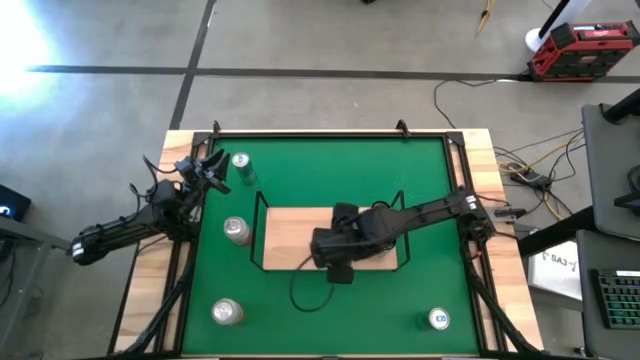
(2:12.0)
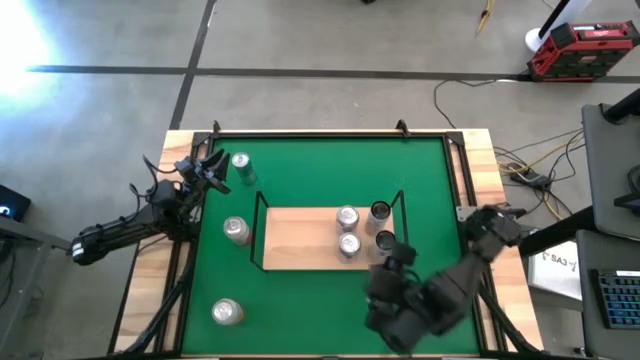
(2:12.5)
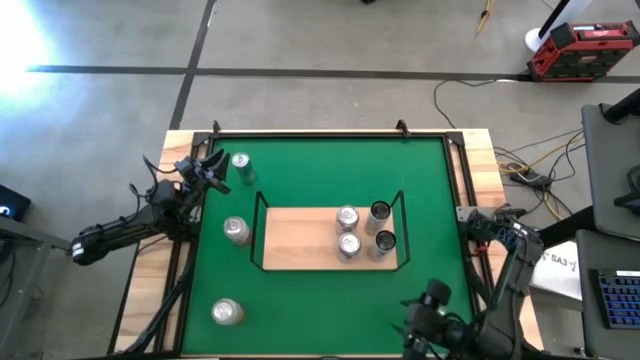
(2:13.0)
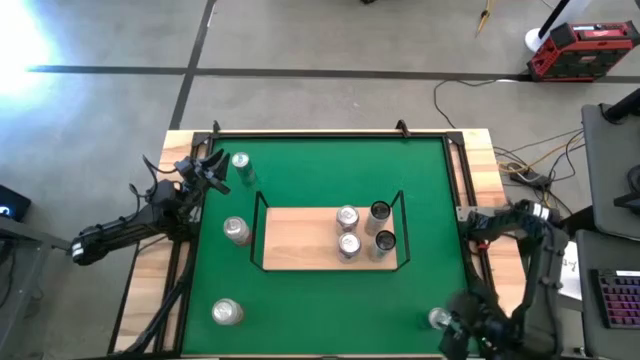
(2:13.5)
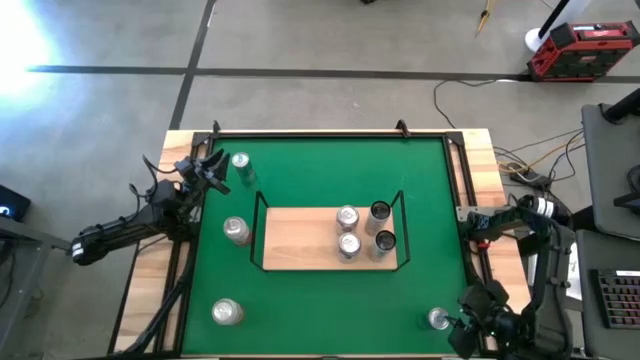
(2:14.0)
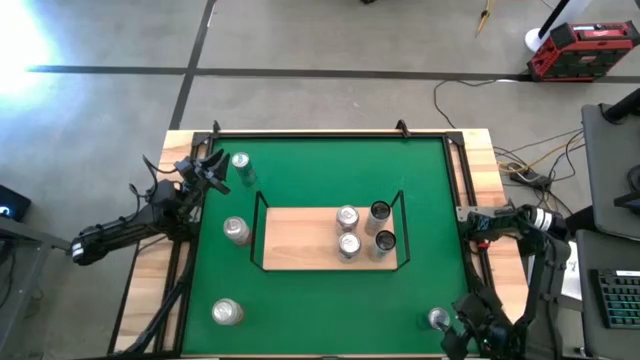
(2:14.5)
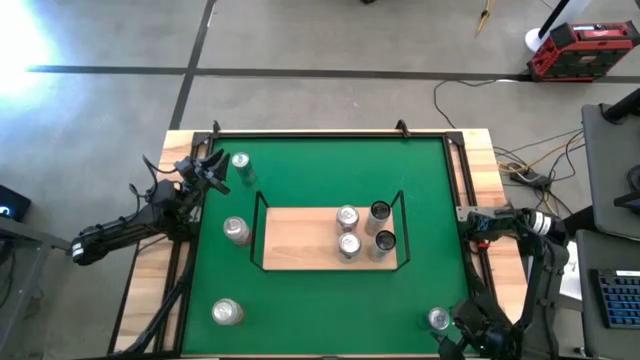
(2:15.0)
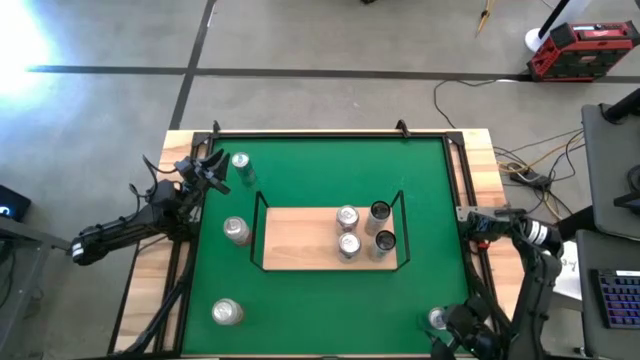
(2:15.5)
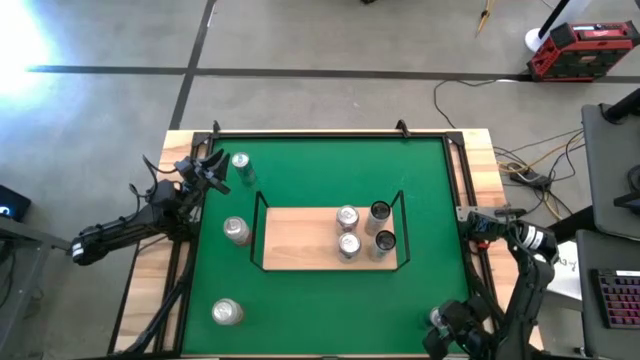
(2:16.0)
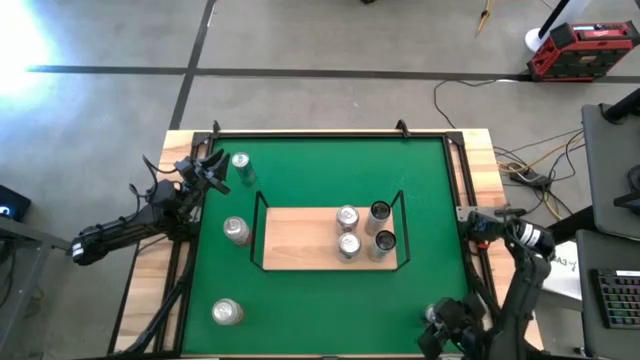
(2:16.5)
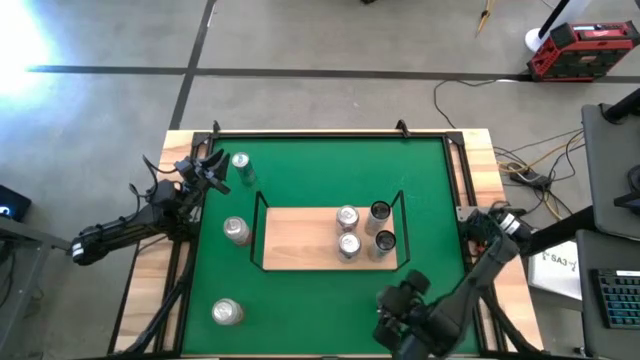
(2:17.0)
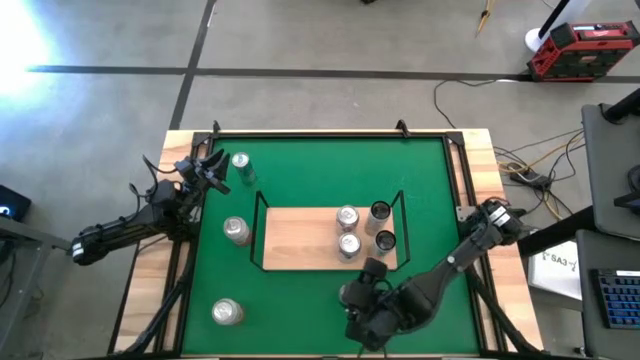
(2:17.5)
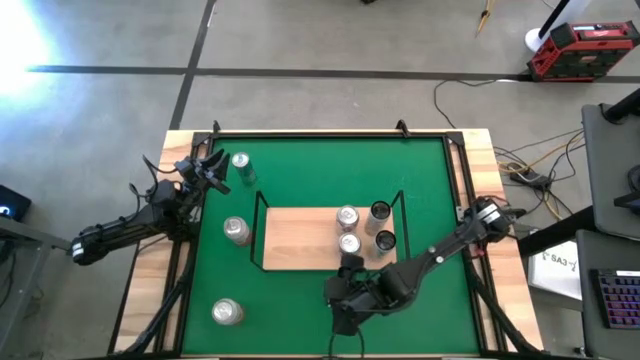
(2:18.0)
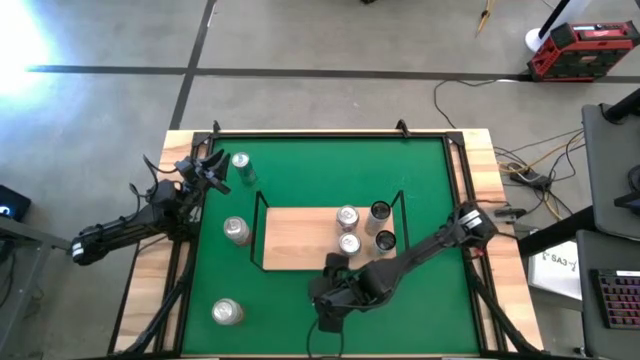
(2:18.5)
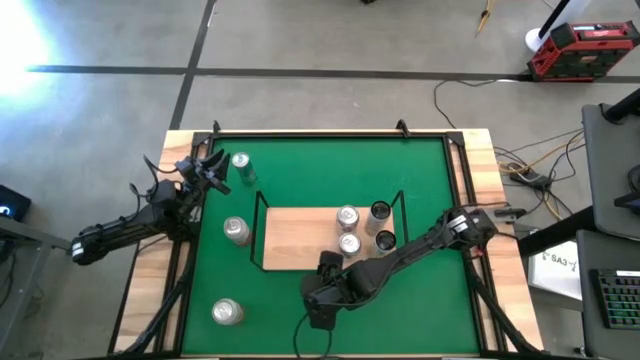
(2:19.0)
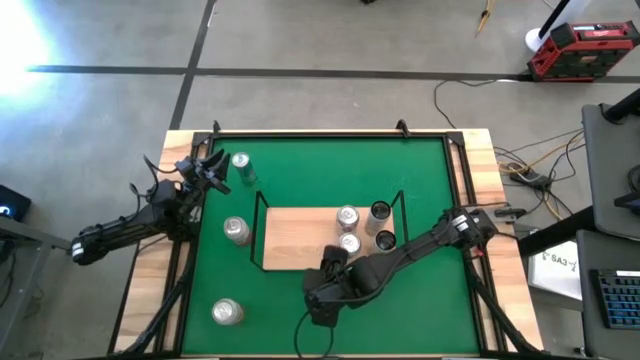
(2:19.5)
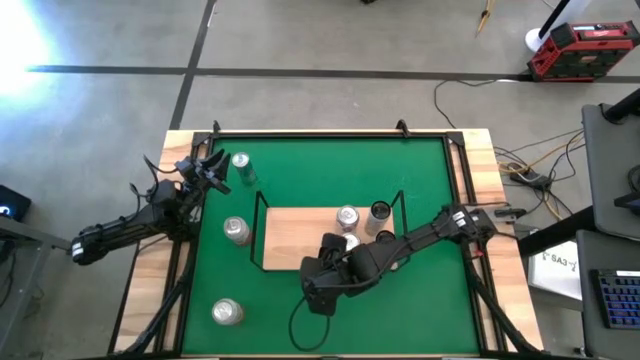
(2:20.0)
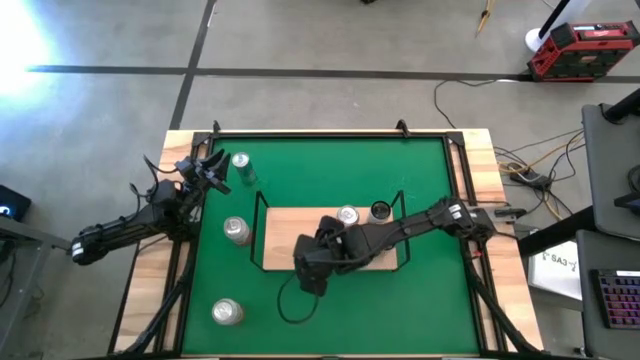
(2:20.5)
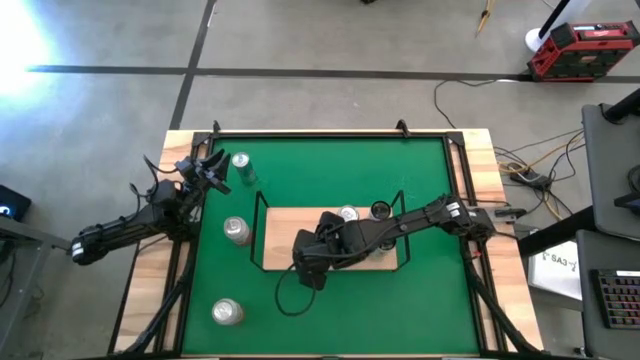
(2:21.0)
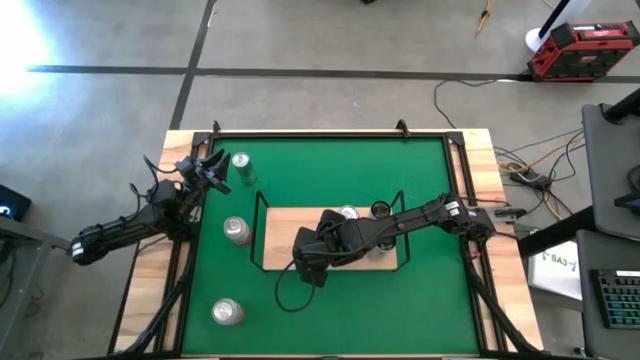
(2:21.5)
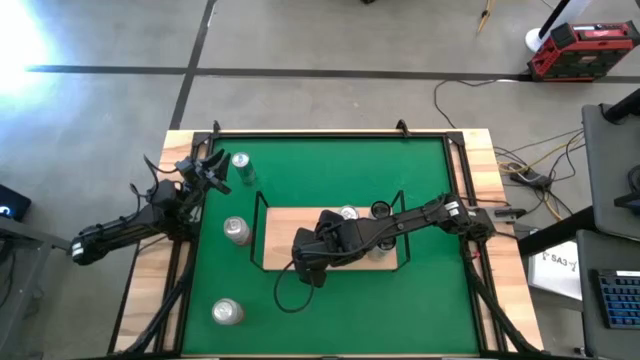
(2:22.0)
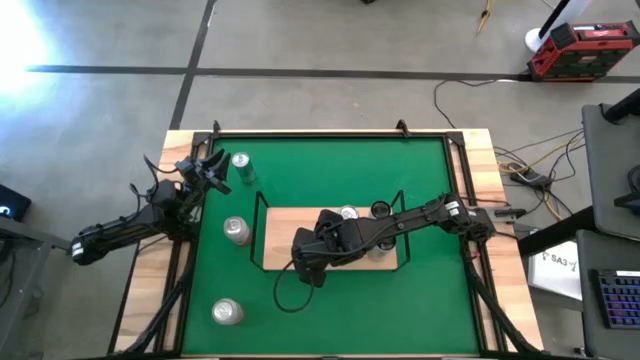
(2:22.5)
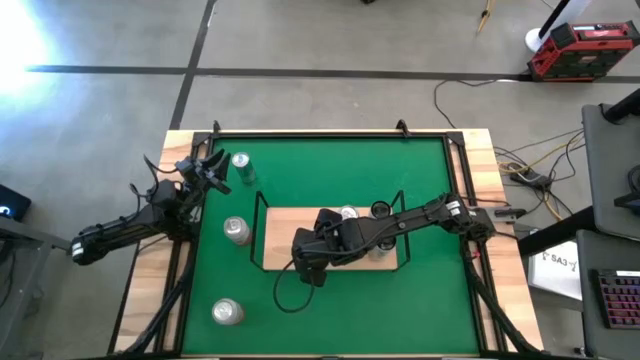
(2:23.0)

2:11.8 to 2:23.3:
Task: Place canned beverage on shelf
Put the bottom blue soda can on the shelf

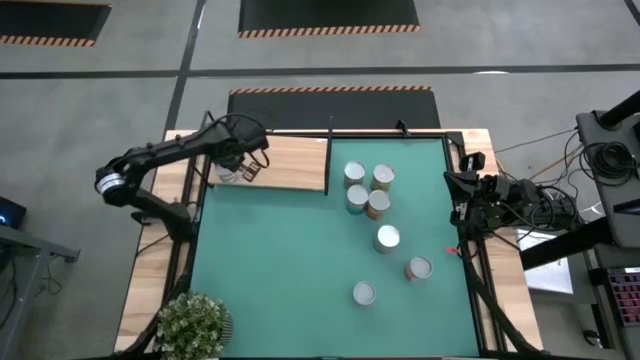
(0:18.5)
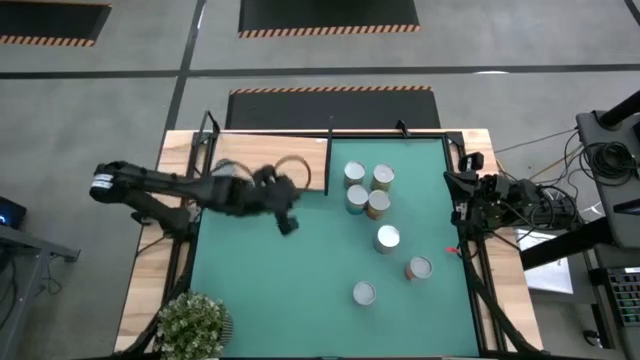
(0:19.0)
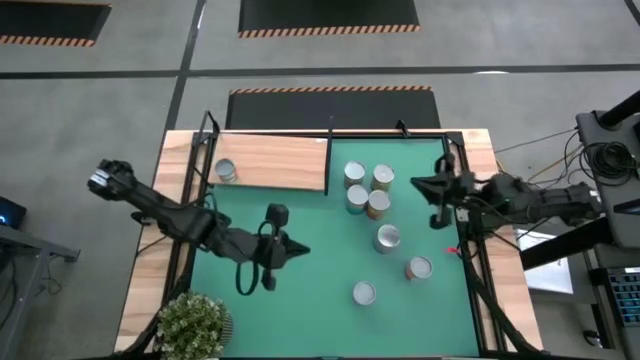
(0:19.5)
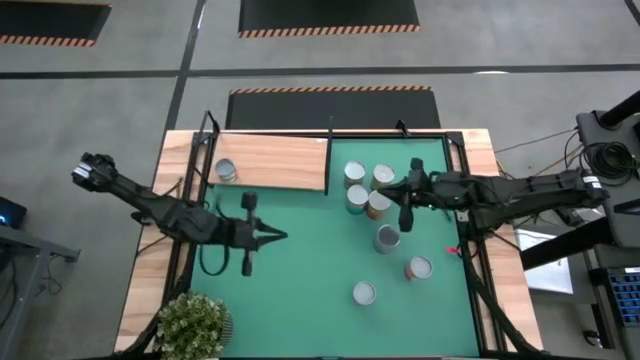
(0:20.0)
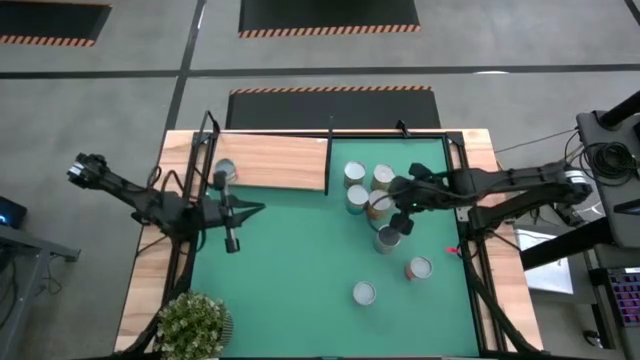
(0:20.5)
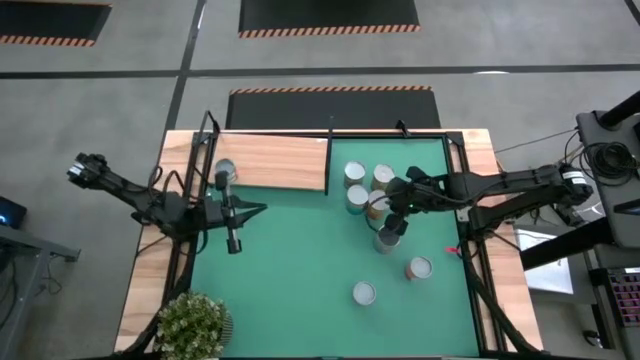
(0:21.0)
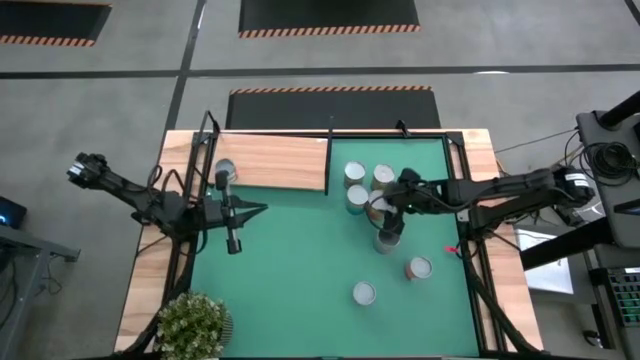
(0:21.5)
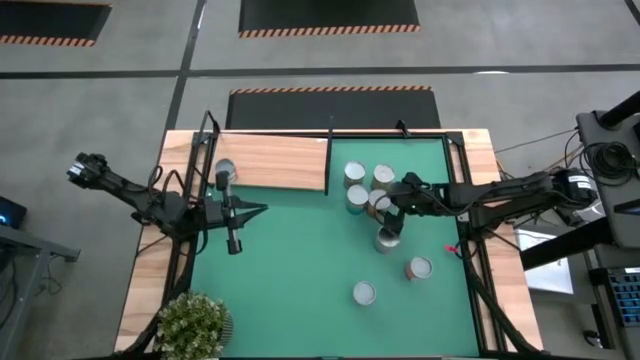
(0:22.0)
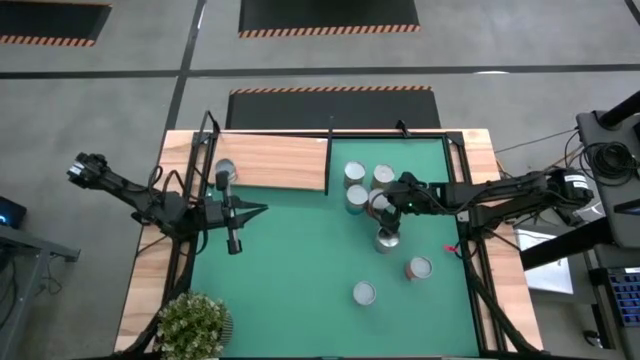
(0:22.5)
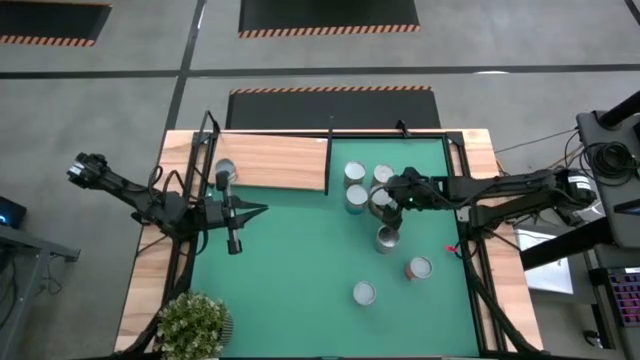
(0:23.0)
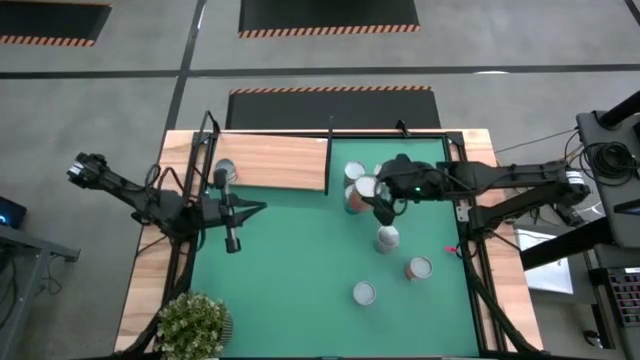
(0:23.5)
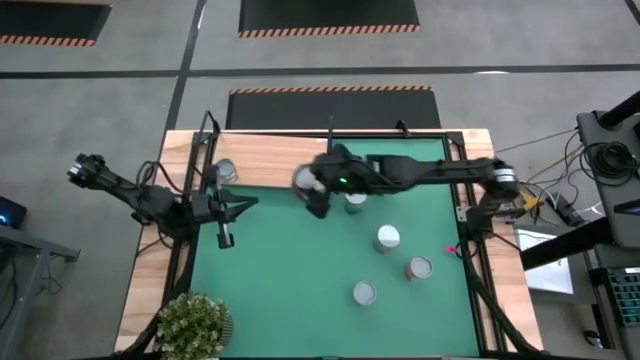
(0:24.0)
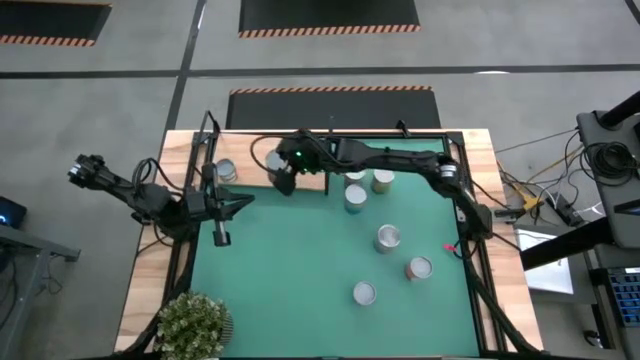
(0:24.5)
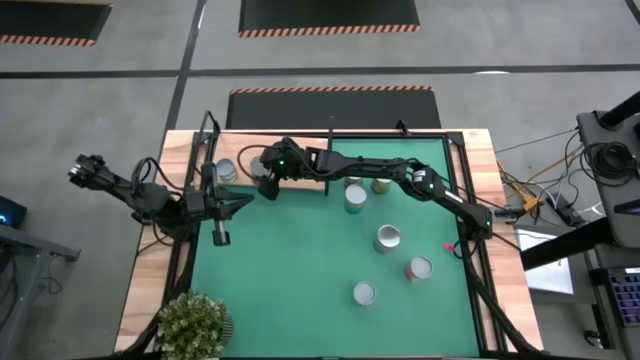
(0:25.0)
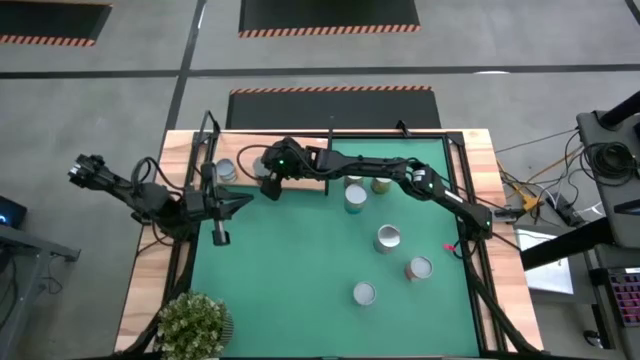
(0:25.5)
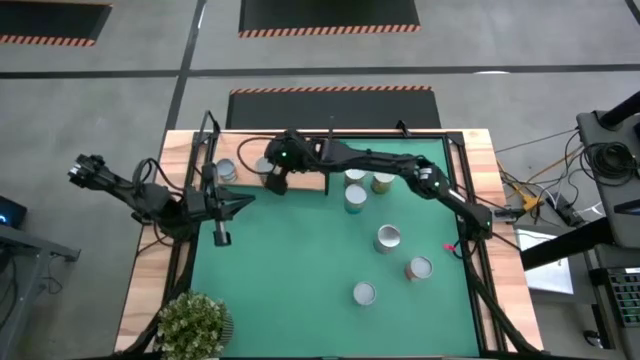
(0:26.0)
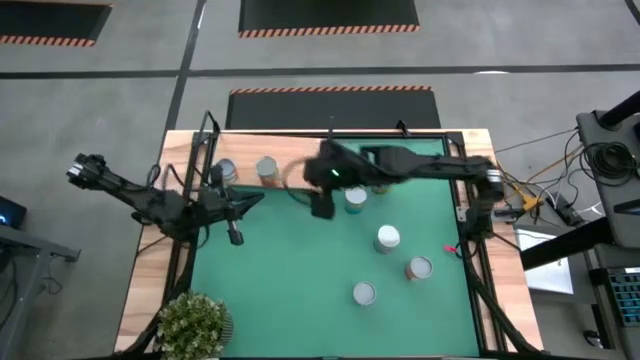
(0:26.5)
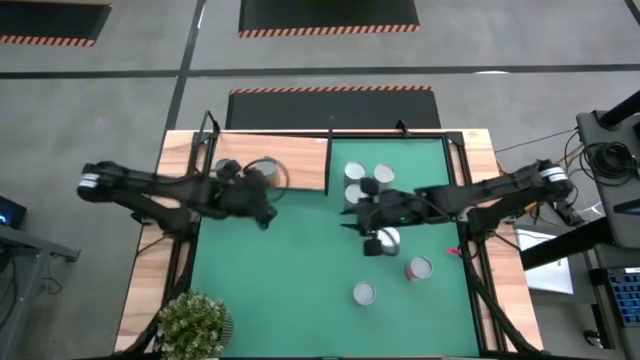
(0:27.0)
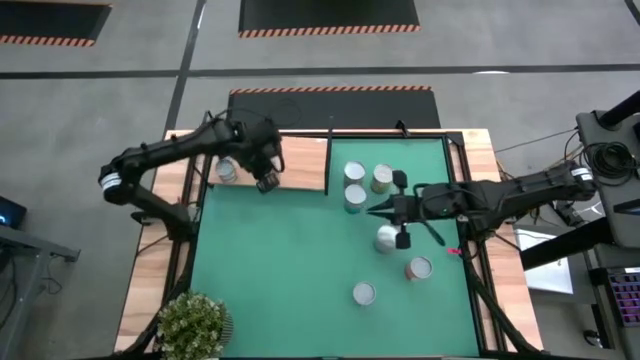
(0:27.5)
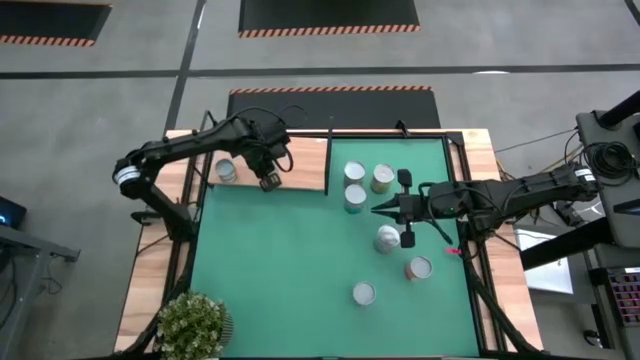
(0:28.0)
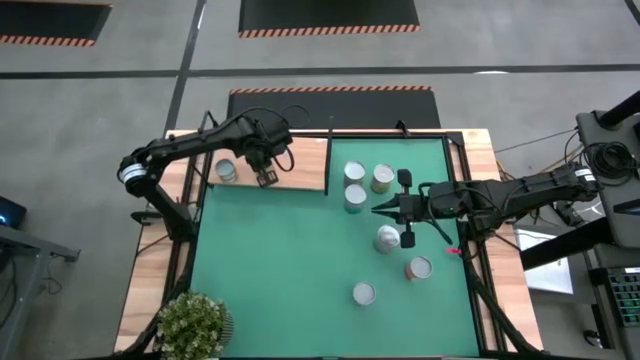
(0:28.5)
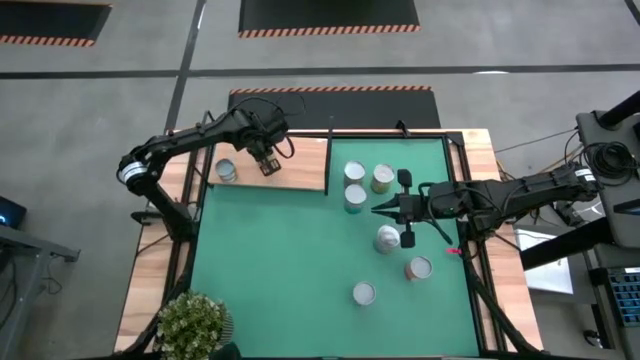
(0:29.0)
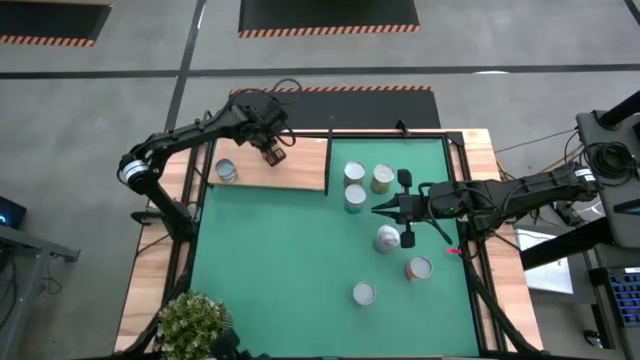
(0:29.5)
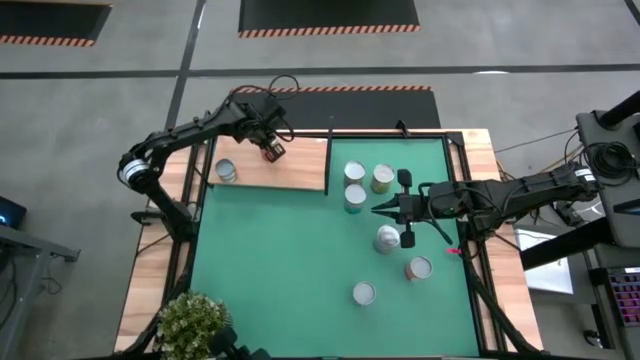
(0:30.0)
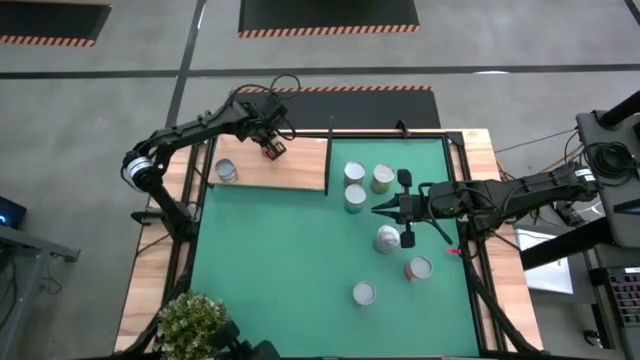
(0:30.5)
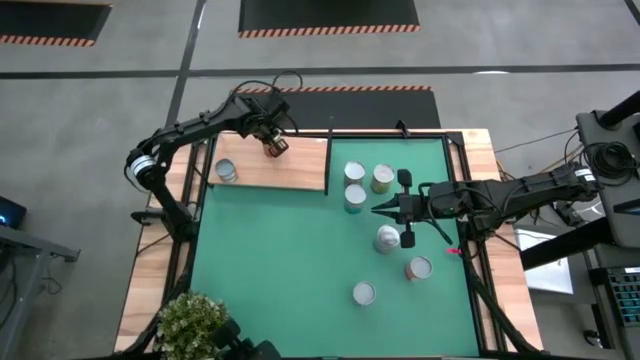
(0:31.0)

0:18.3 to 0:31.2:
Task: Pick and place cans onto a shelf
Put the canned pineapple on the shelf
